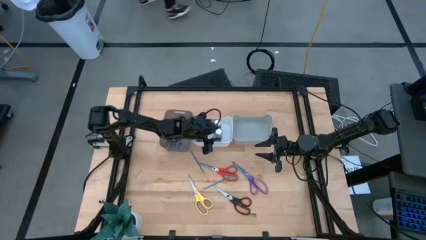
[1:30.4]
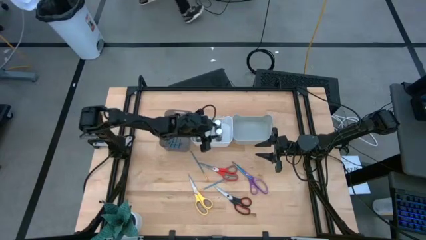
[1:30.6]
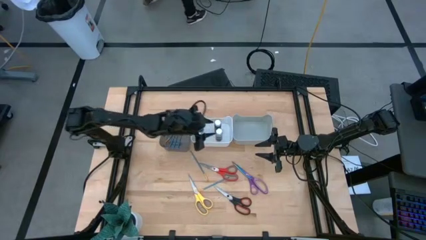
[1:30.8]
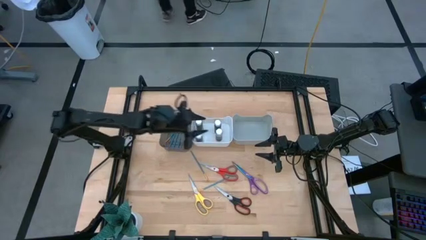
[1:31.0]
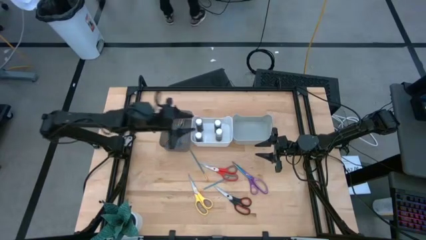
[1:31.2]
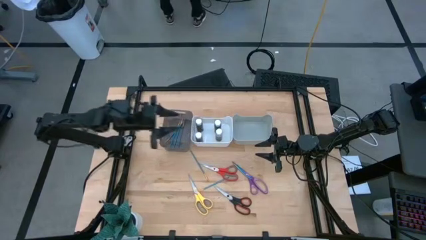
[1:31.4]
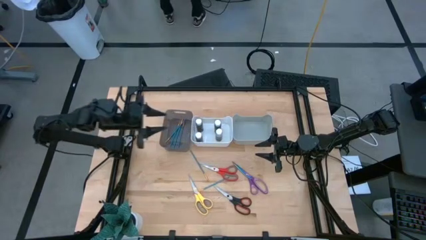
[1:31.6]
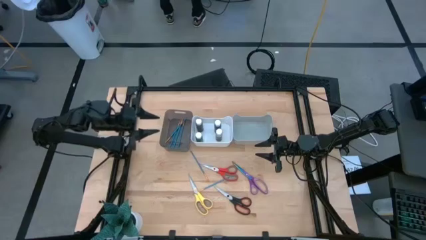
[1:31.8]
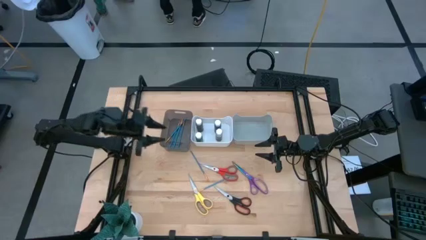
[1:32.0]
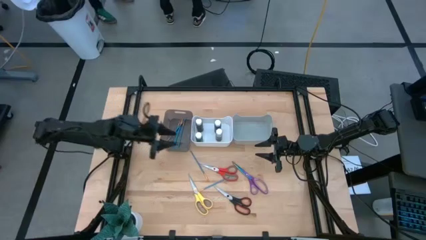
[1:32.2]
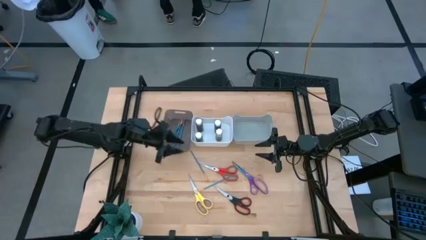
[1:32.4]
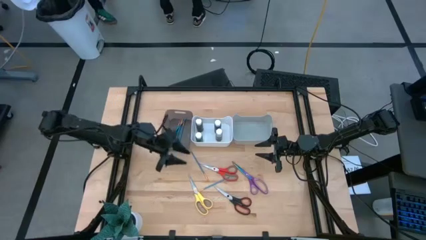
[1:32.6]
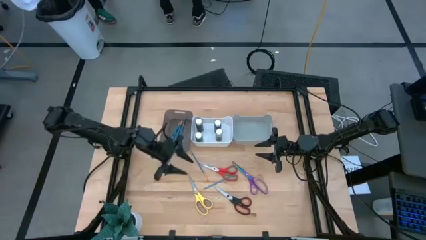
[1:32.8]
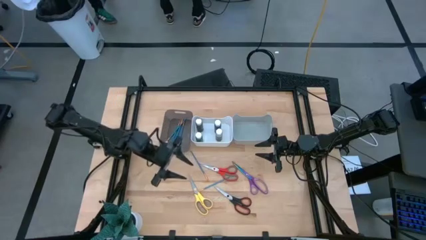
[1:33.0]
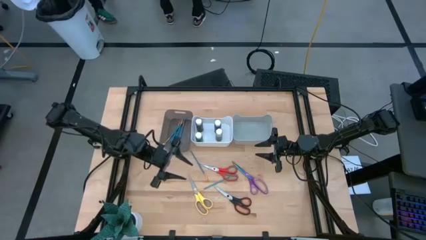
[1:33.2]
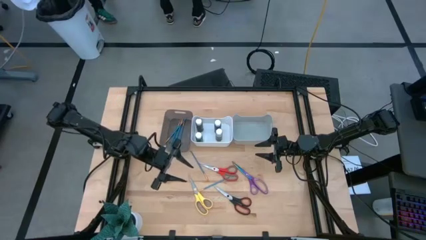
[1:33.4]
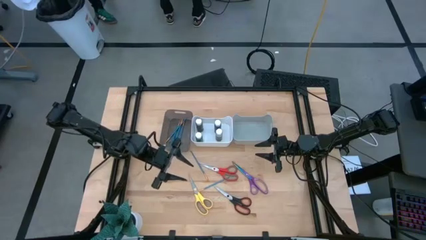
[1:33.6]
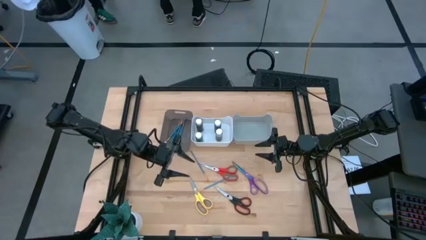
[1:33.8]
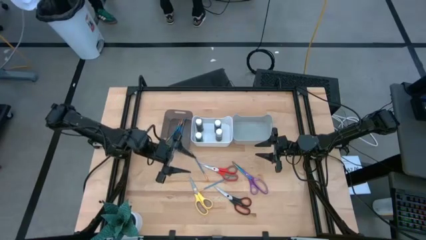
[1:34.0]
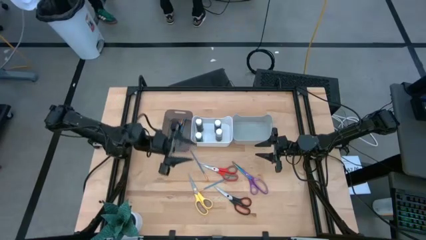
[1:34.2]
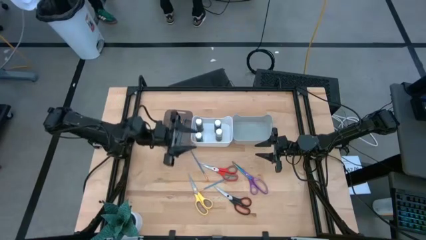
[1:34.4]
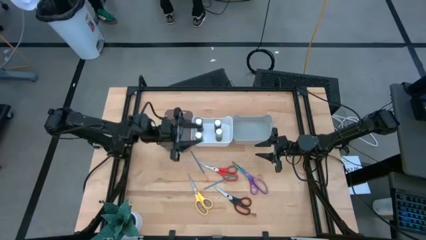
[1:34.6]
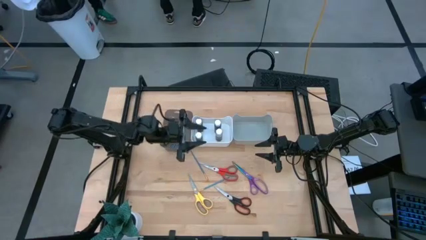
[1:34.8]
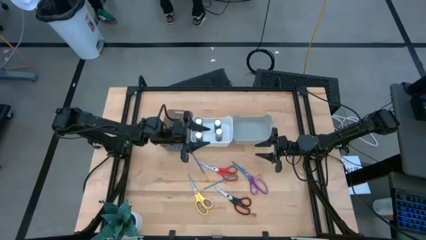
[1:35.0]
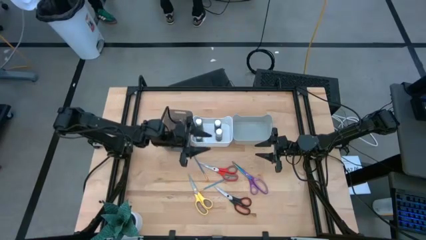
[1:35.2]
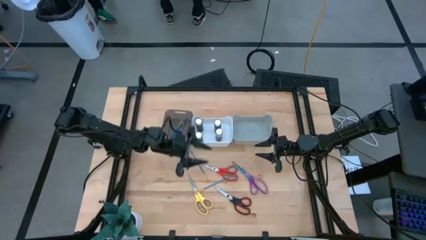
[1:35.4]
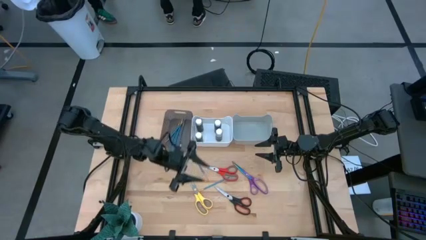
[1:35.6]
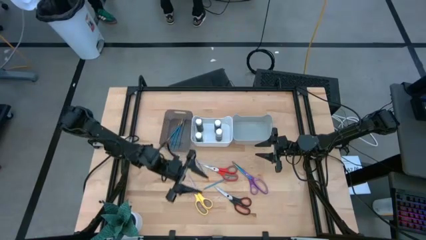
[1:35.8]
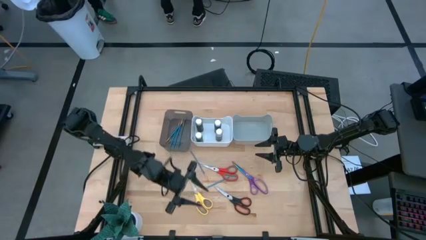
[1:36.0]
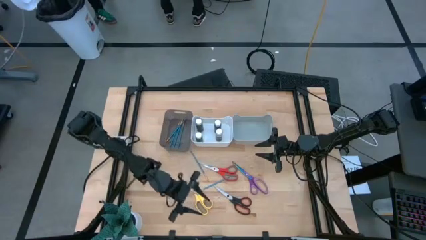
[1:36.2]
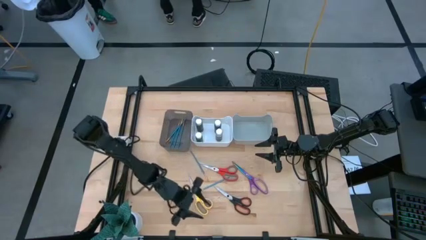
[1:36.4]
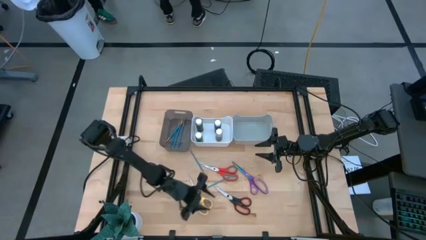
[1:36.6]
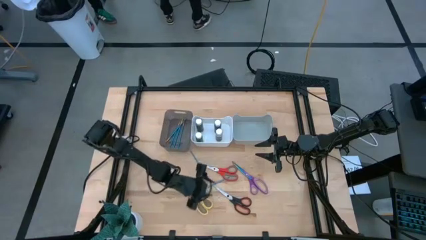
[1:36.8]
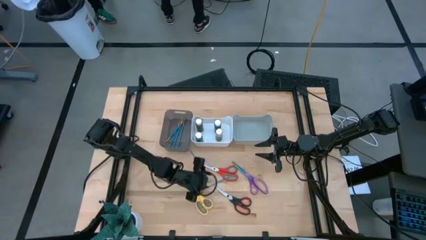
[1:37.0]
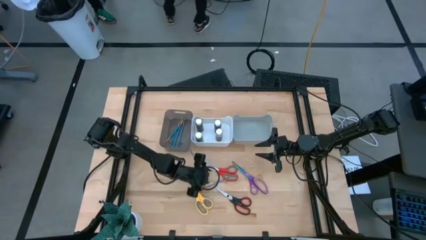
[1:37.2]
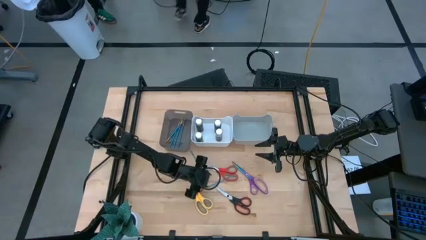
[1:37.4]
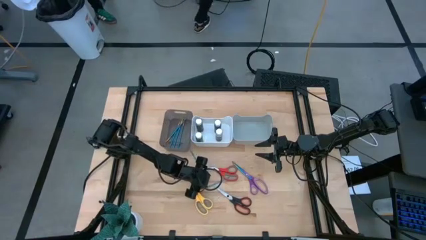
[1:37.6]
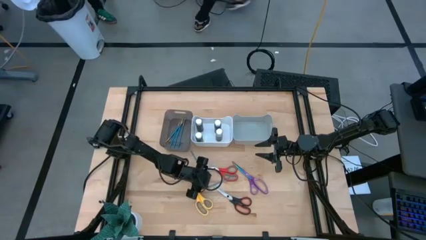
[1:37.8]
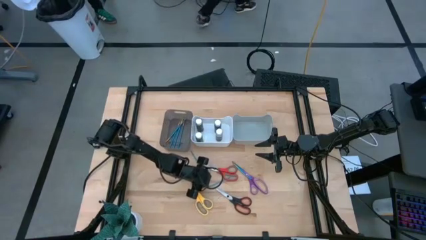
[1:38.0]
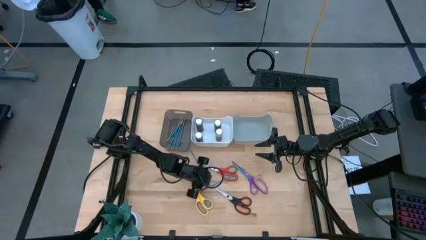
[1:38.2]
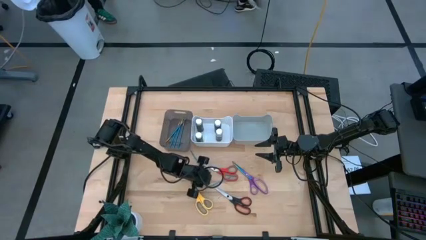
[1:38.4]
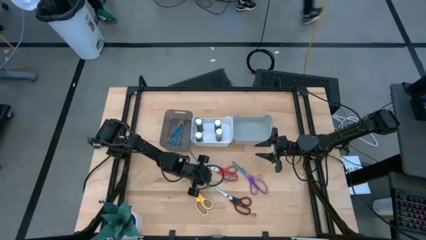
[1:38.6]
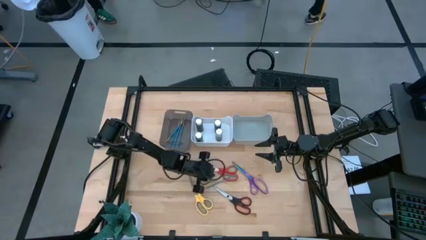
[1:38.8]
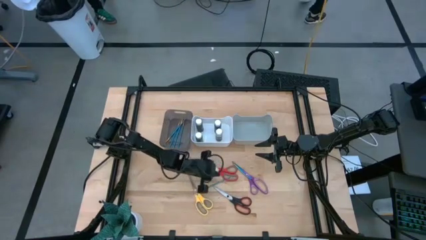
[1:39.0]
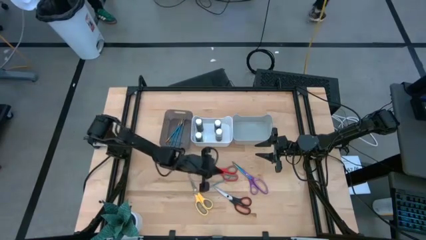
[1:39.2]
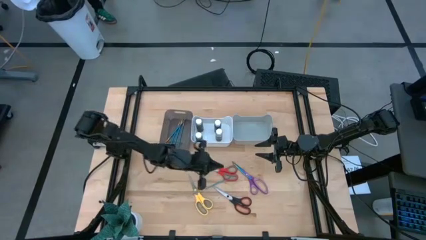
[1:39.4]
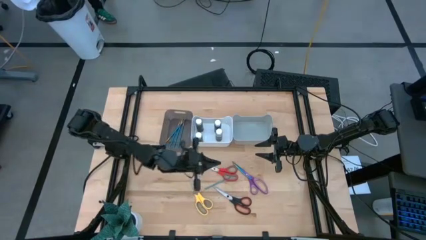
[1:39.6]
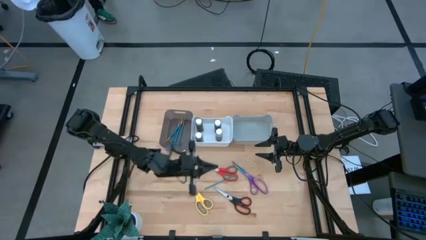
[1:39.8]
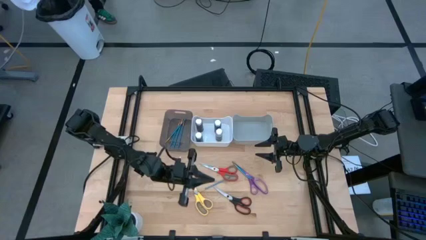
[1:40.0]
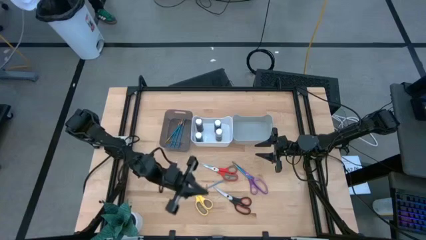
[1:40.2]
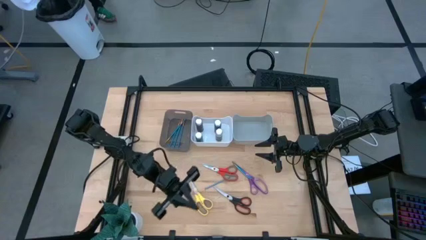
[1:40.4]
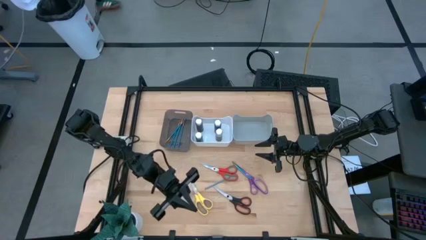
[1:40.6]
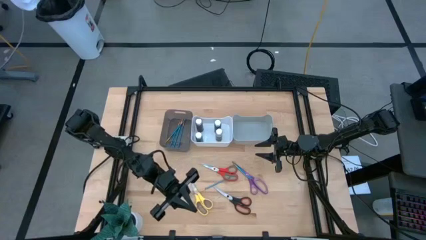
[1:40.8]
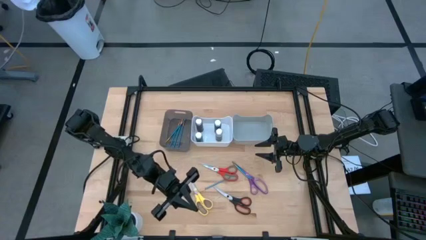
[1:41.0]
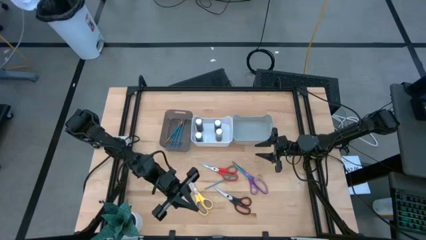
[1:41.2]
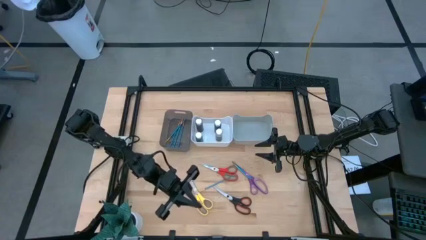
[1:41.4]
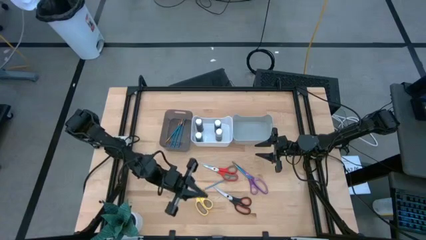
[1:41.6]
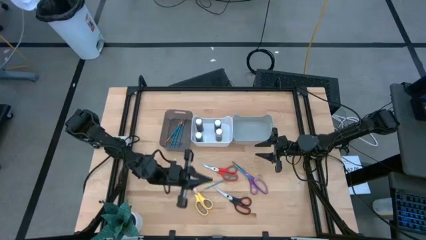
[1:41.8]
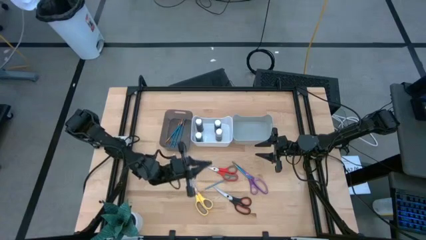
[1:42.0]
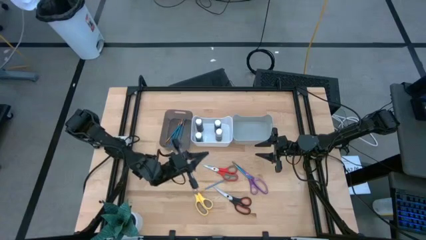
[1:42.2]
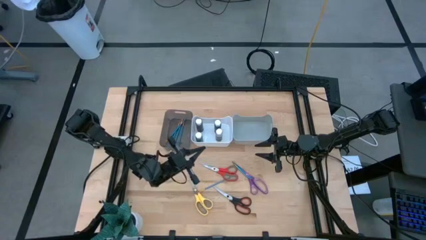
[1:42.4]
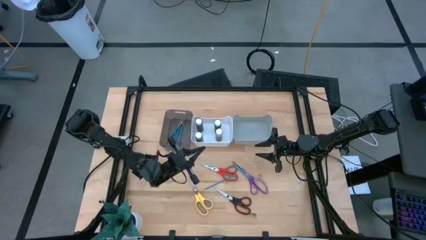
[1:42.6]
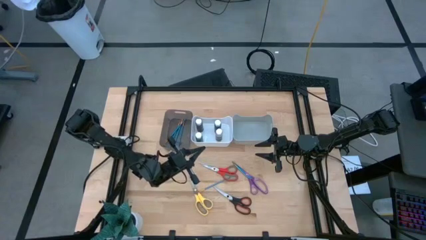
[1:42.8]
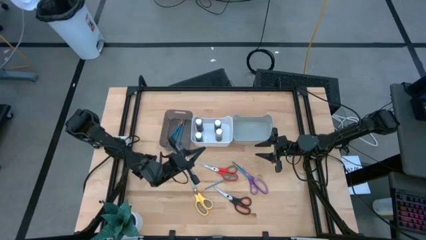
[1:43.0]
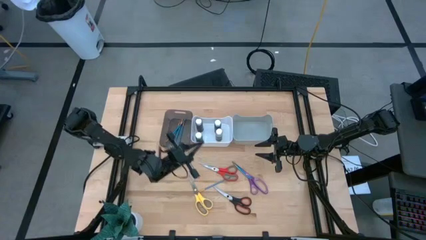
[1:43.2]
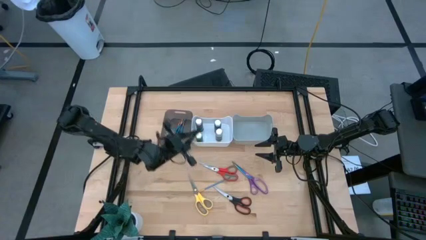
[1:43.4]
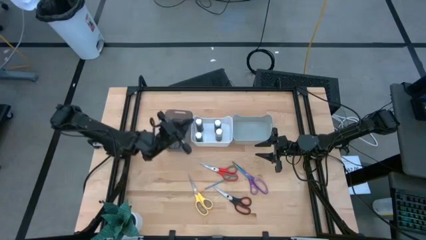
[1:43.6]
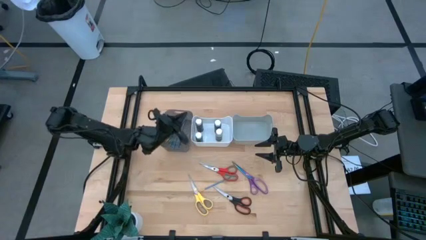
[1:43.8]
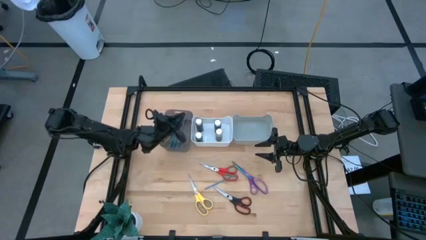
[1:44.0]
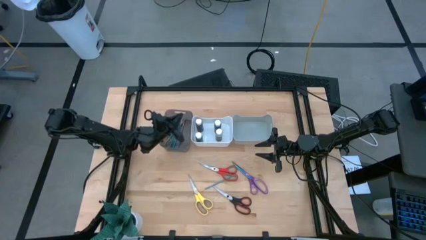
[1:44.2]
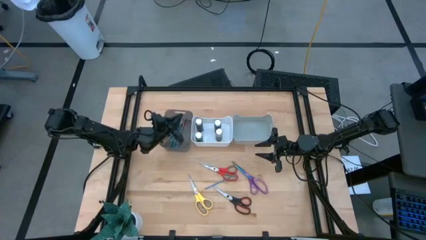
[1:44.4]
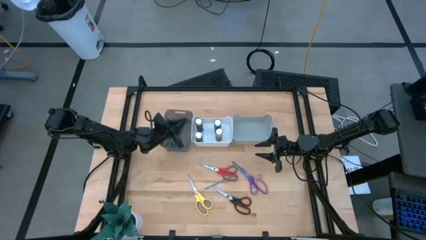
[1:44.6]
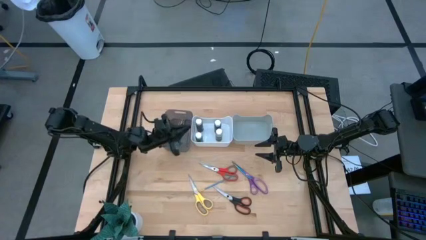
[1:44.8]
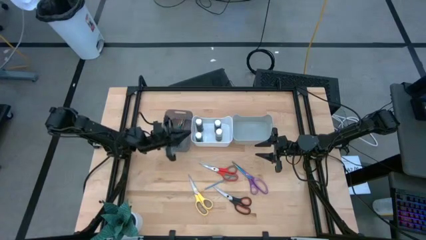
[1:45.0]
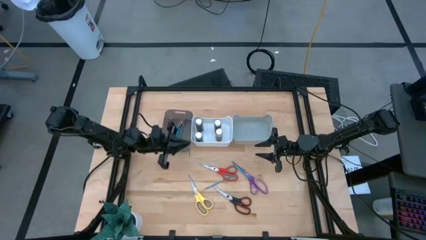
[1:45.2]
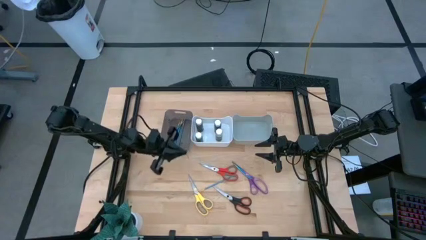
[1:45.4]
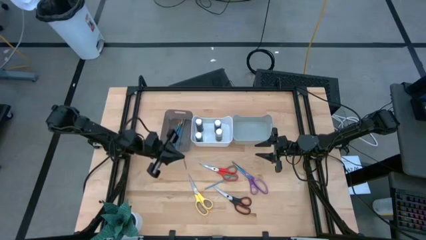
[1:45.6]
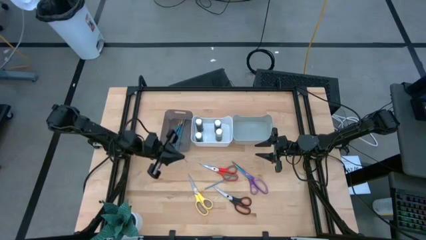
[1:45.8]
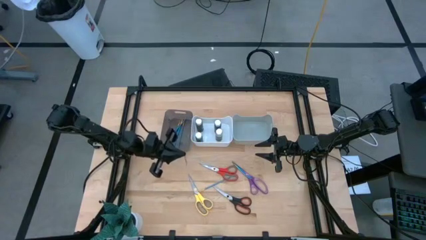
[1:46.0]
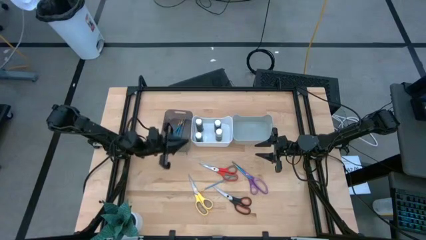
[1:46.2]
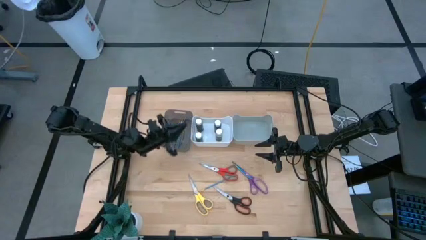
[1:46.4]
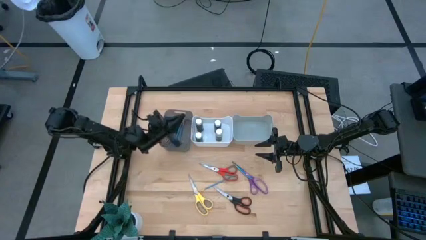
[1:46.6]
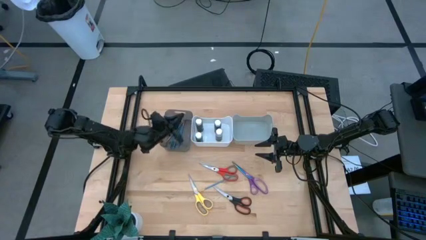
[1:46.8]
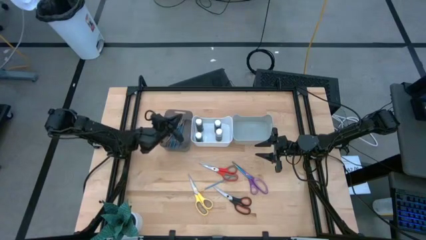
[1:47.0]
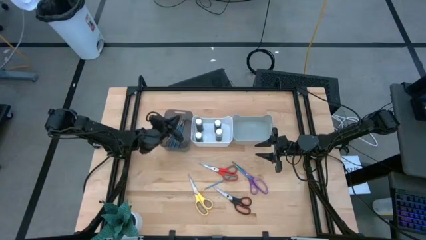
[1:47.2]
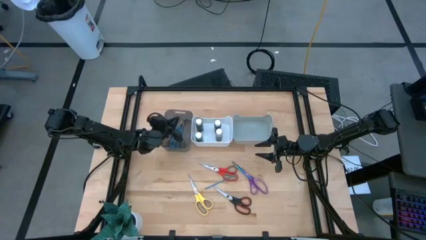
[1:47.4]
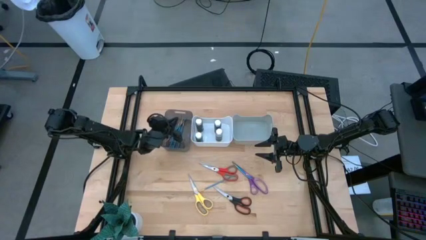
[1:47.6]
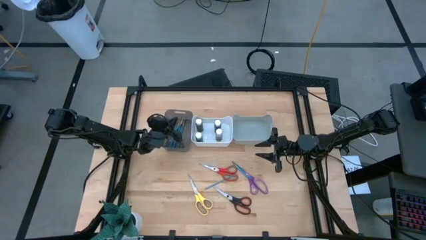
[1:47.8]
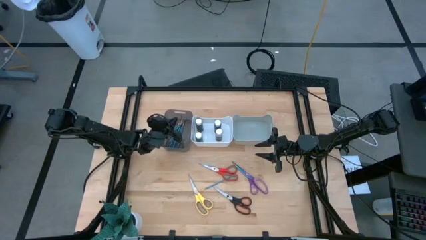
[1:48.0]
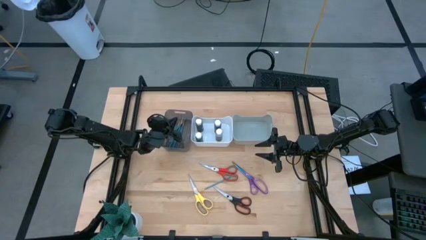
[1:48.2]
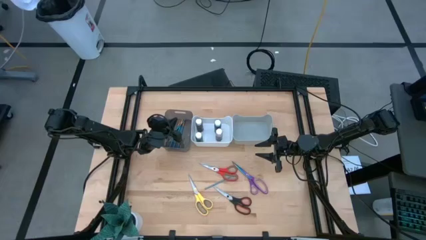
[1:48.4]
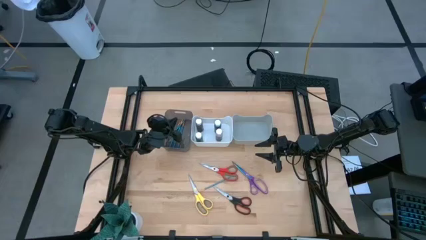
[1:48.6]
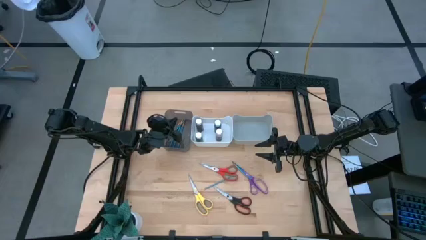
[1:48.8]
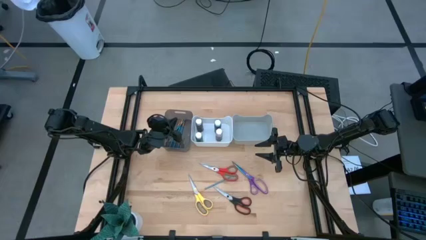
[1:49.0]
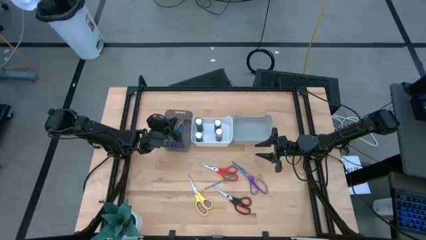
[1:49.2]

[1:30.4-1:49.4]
Task: Pick & Place Paint Supplies
Put the blue paint brush into the black bin
